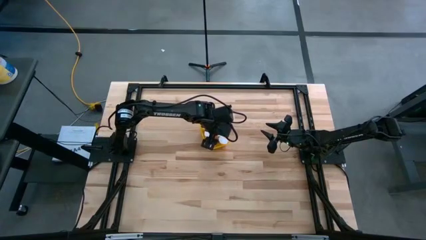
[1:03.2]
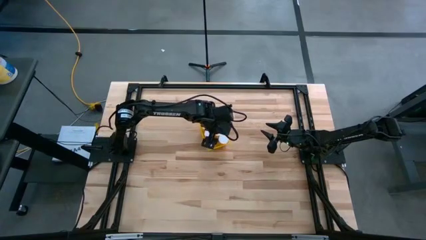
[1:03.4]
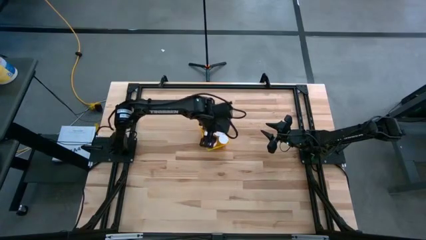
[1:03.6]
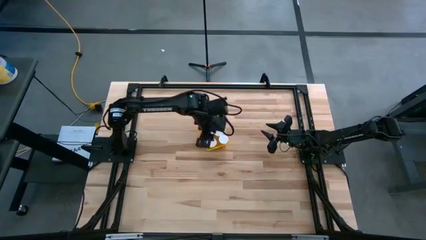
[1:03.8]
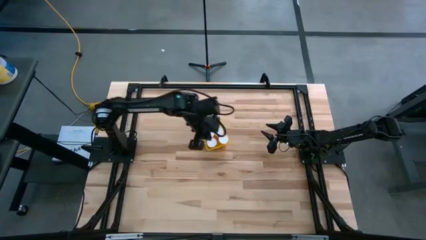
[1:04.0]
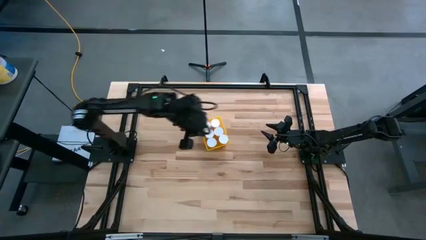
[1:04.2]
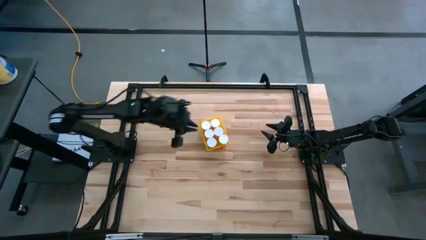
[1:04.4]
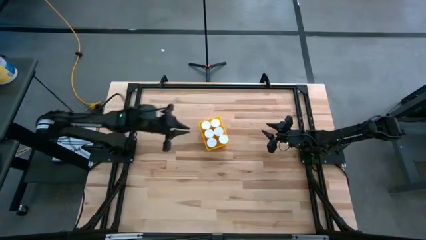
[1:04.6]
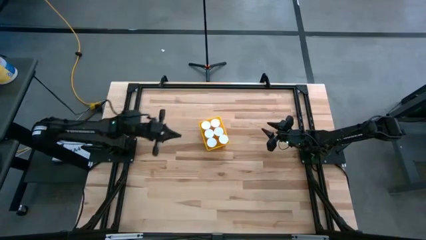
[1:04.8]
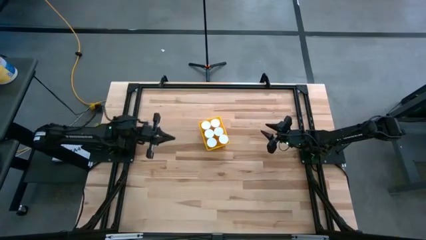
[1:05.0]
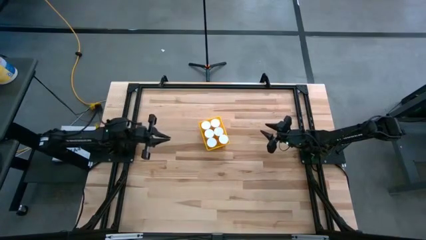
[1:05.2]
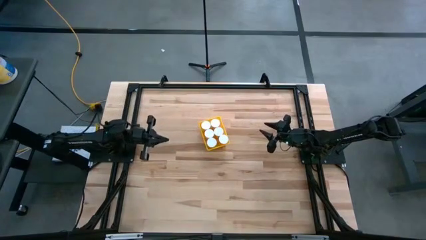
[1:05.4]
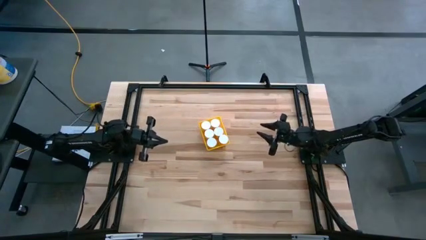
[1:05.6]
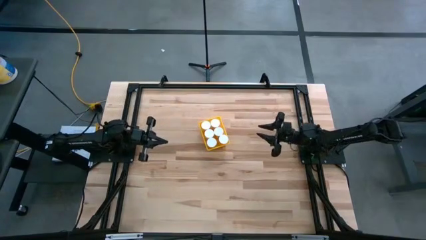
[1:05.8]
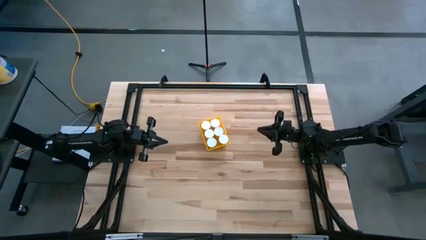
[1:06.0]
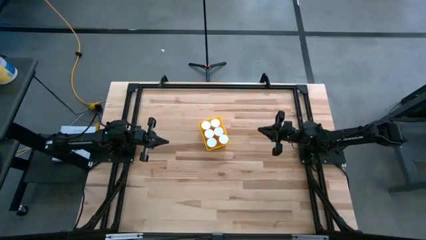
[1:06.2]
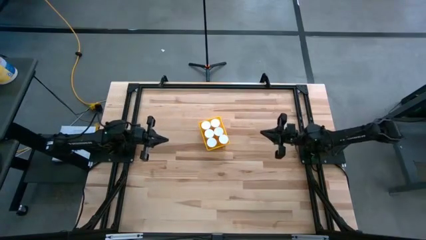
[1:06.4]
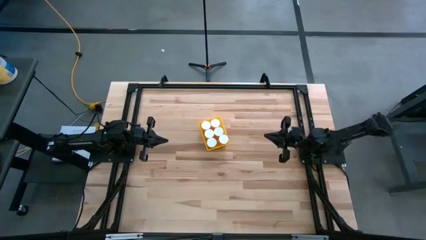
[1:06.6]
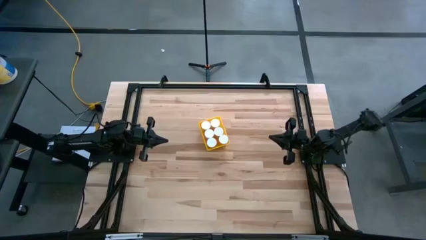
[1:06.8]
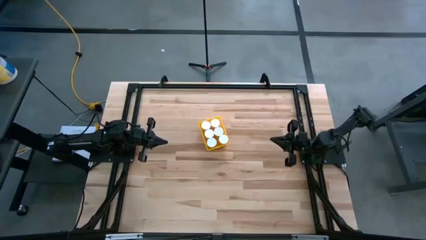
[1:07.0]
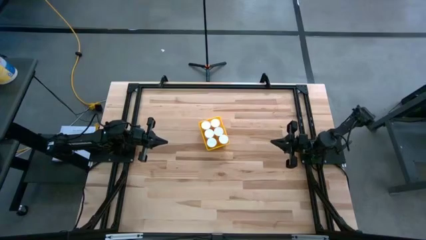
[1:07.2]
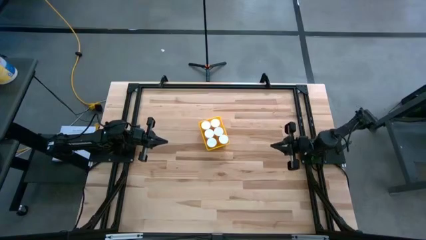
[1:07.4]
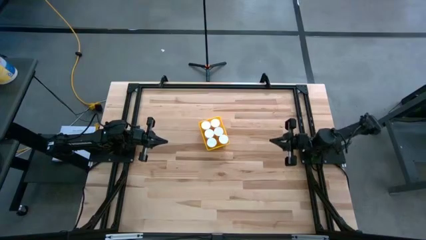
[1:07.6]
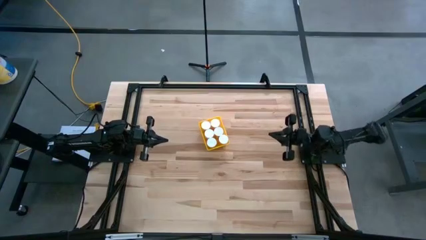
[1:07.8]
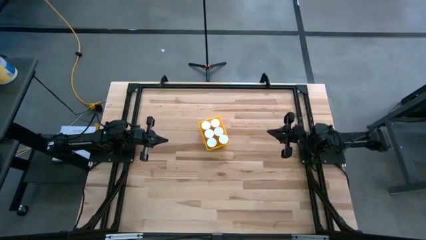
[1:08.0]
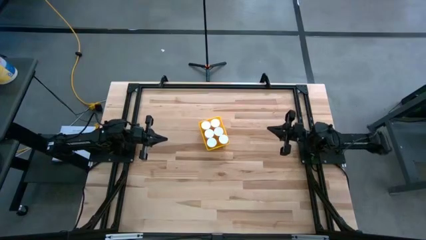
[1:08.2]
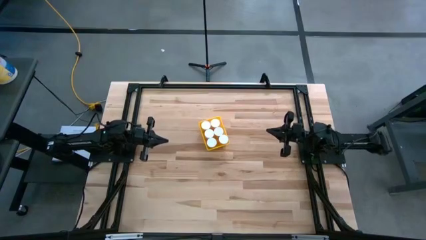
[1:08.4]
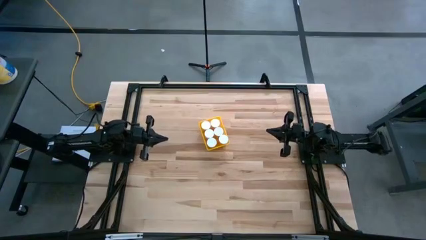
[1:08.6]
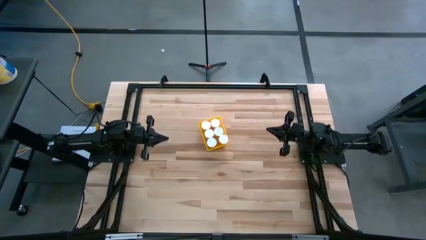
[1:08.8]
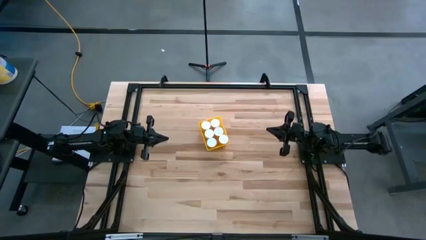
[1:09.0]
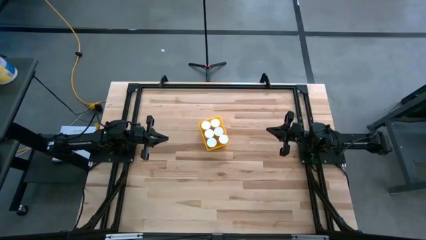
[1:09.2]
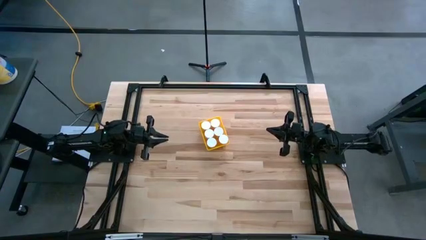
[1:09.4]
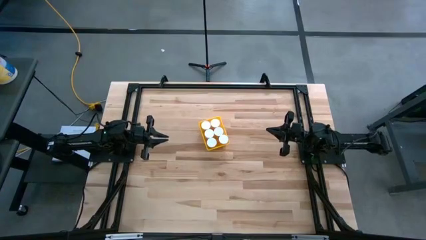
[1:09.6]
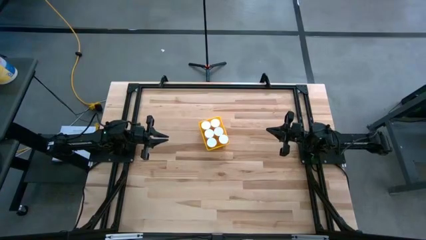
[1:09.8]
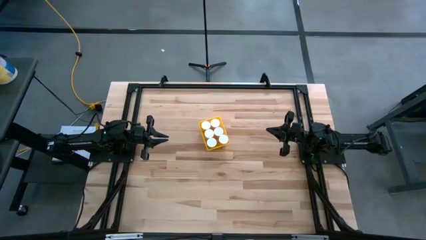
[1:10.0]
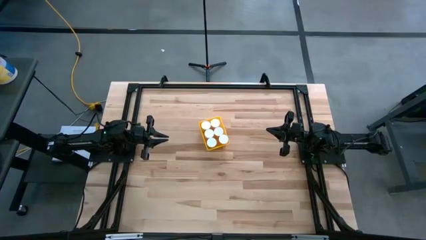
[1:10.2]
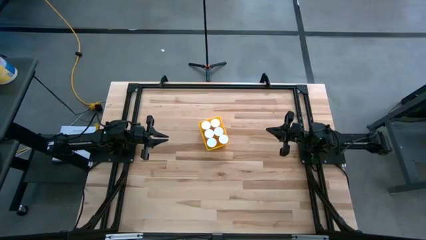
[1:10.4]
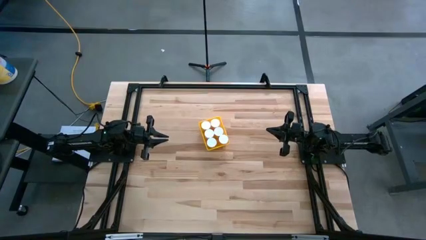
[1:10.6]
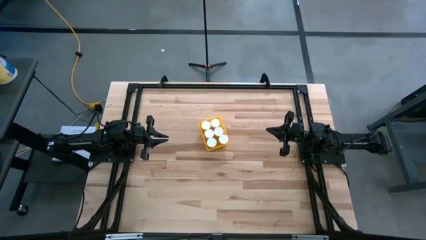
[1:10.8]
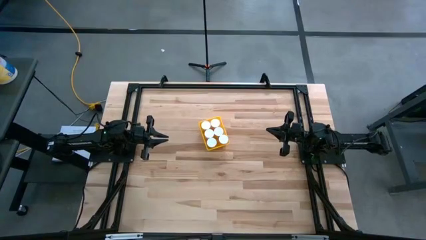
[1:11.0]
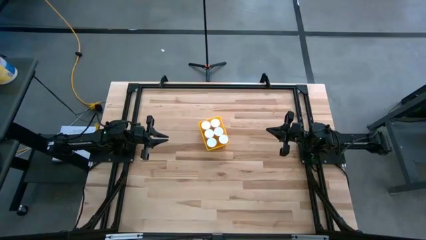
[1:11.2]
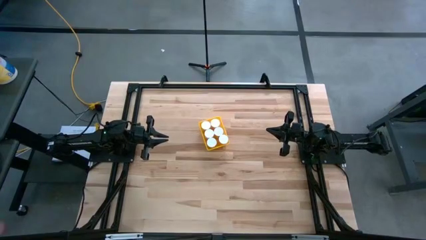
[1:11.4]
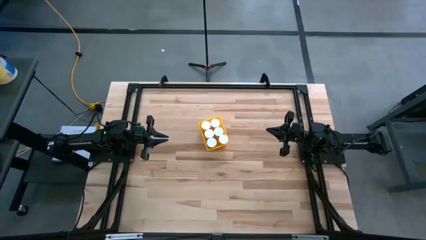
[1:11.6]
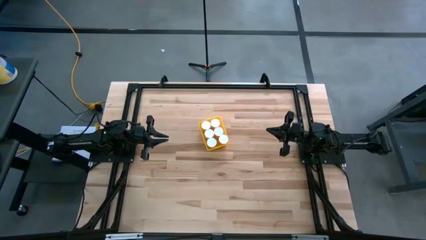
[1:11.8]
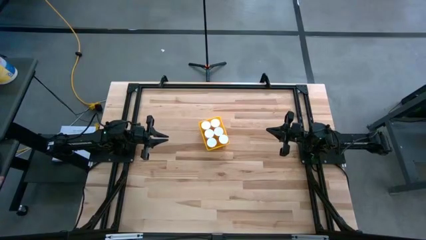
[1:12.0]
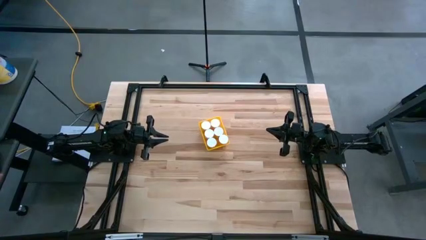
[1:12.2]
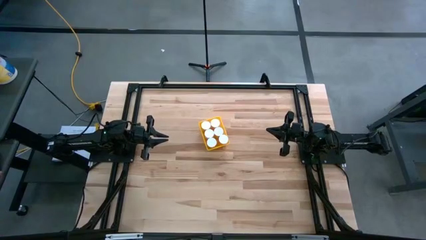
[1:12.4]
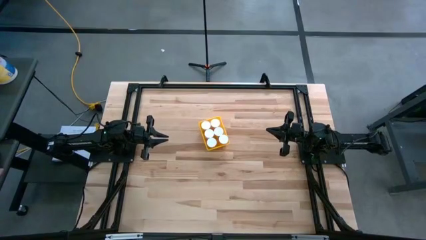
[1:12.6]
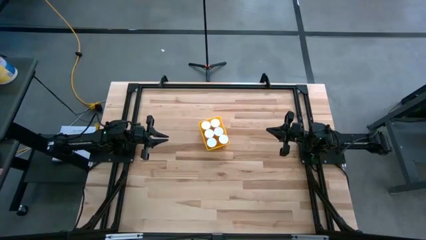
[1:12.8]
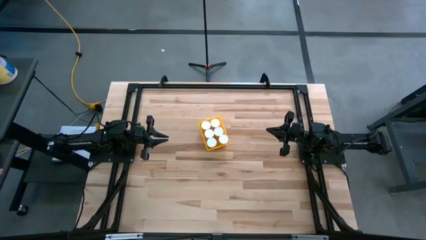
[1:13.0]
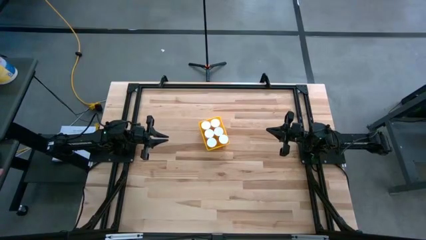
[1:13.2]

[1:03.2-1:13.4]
Task: Pick and place pill bottles into a basket
Return to Home Position
